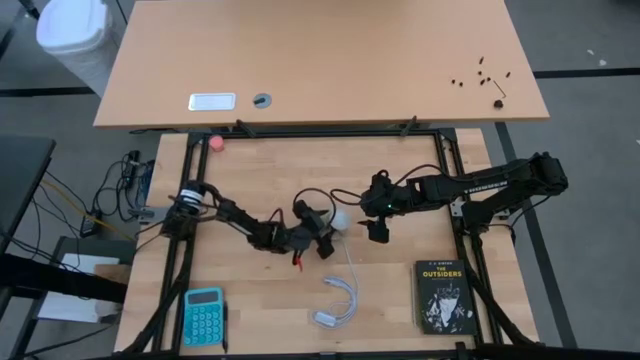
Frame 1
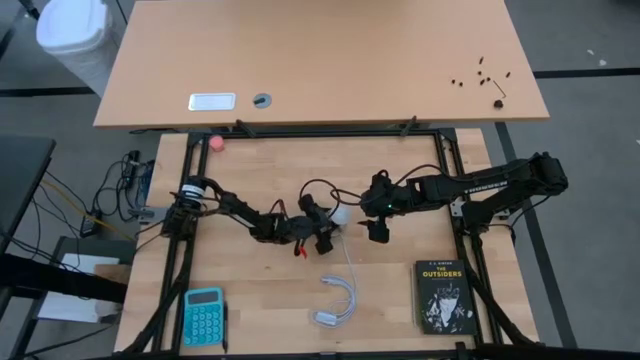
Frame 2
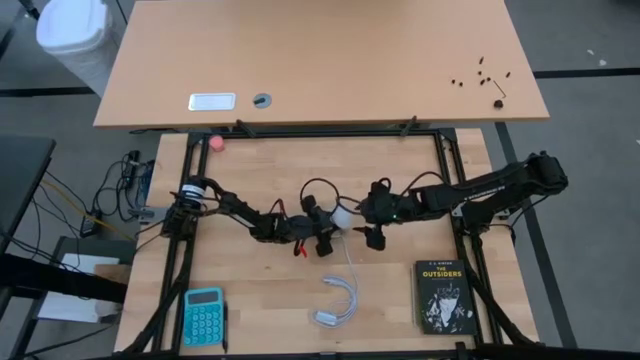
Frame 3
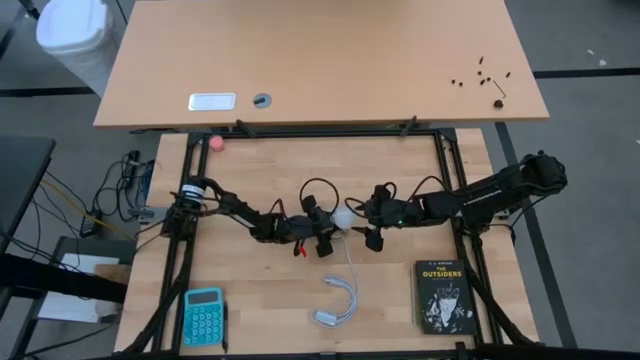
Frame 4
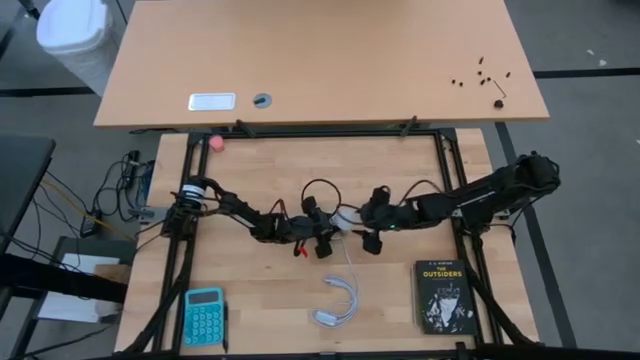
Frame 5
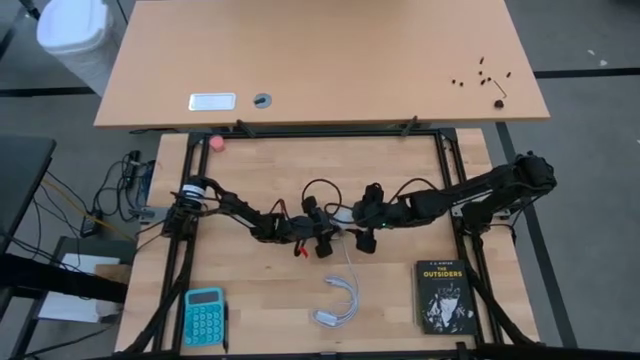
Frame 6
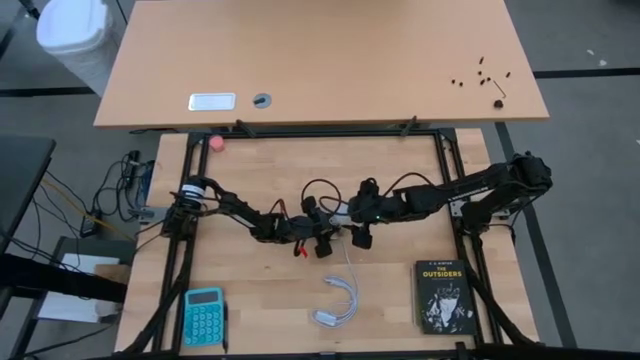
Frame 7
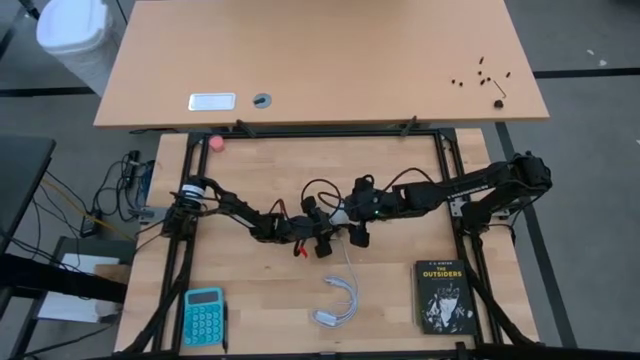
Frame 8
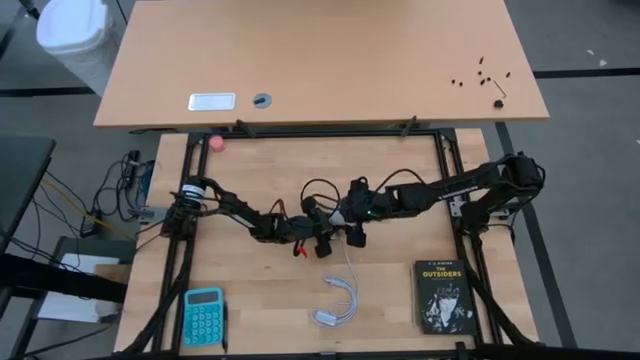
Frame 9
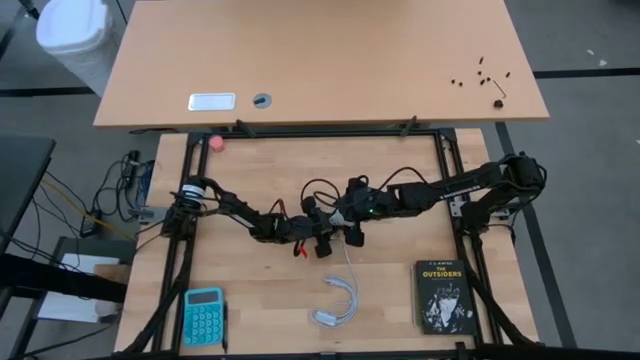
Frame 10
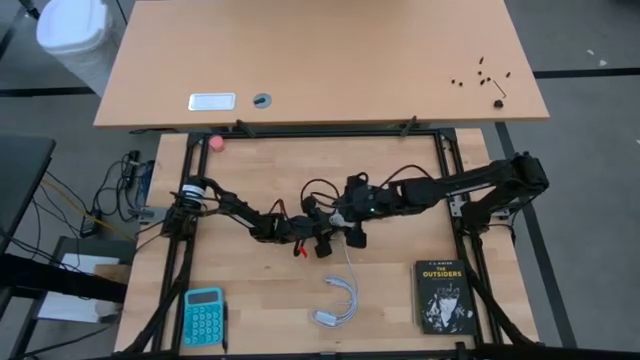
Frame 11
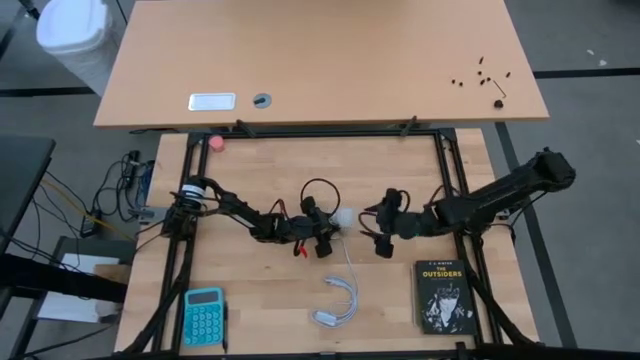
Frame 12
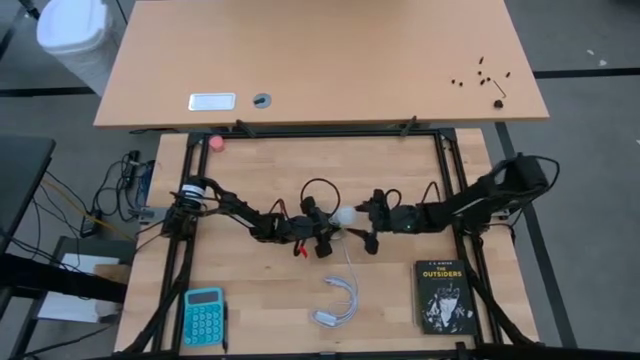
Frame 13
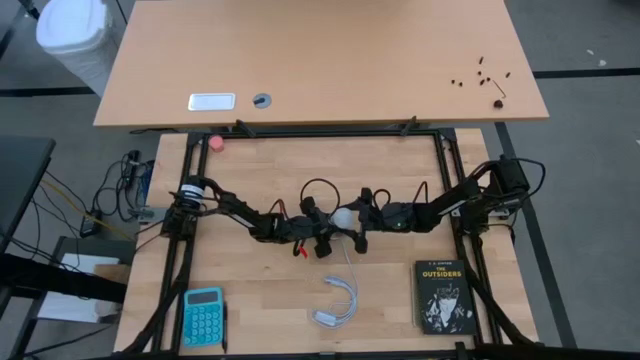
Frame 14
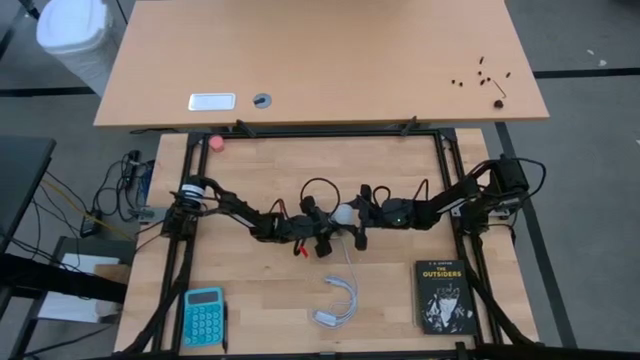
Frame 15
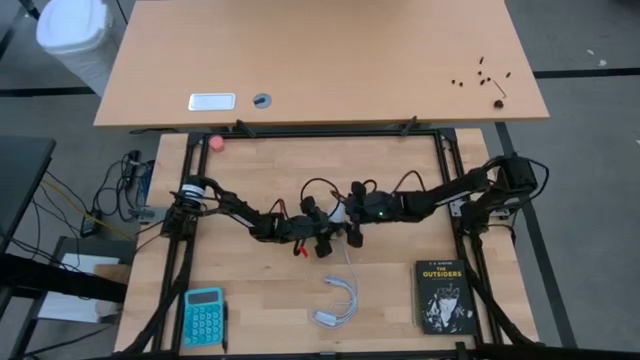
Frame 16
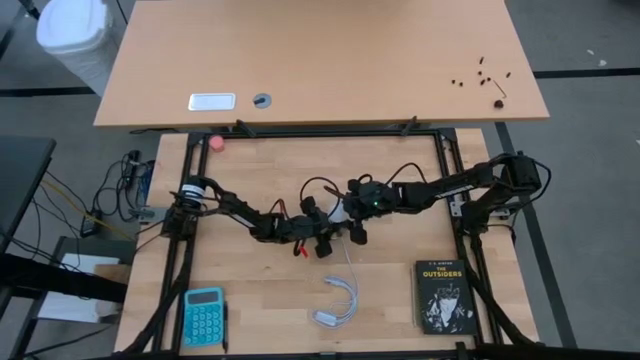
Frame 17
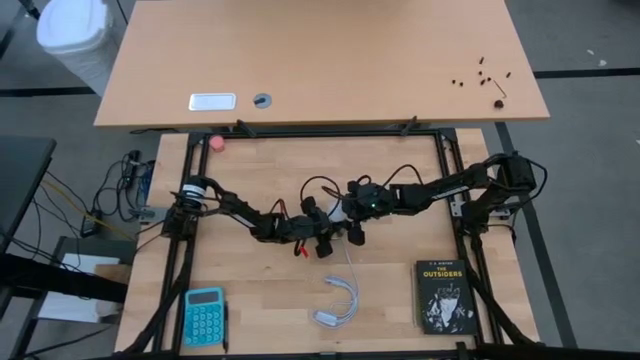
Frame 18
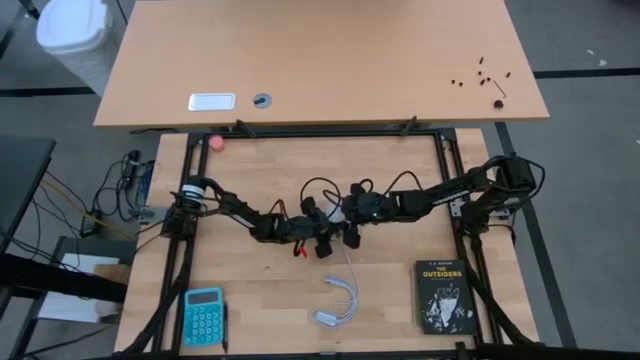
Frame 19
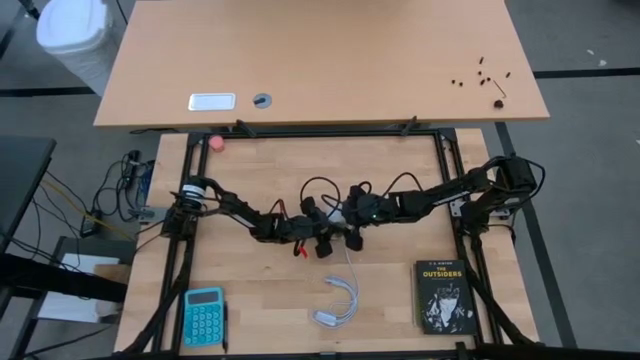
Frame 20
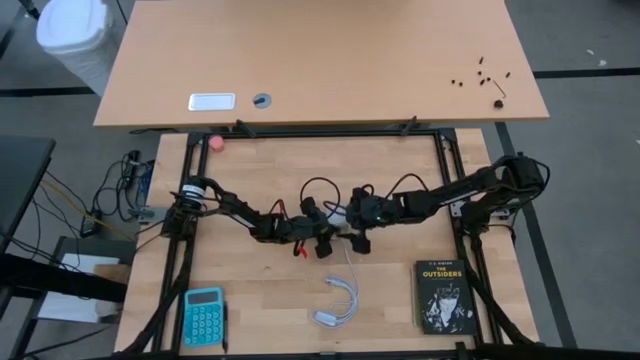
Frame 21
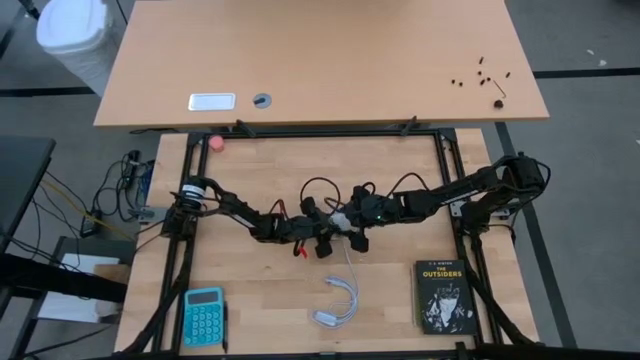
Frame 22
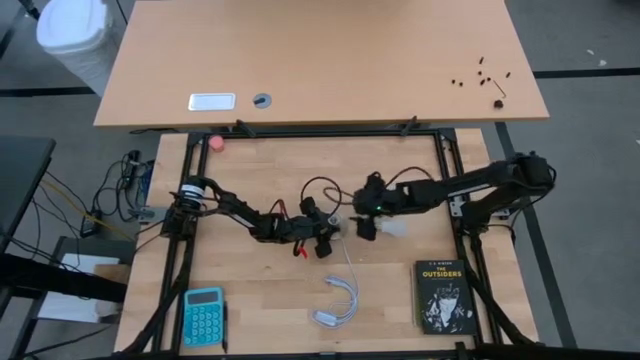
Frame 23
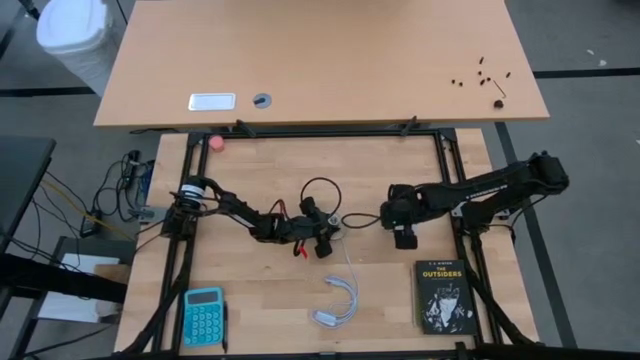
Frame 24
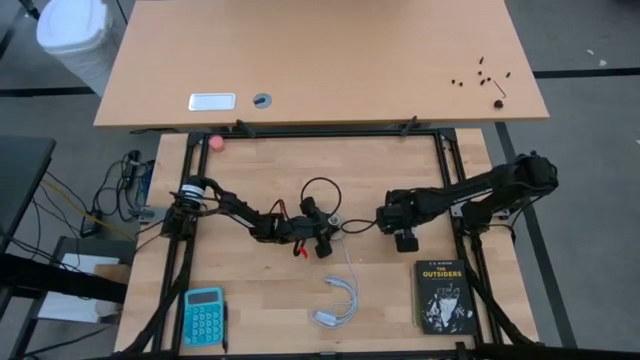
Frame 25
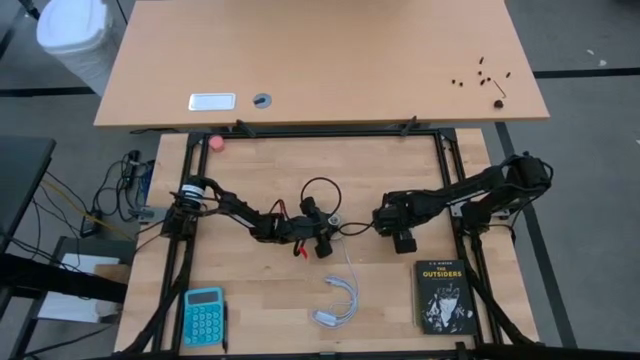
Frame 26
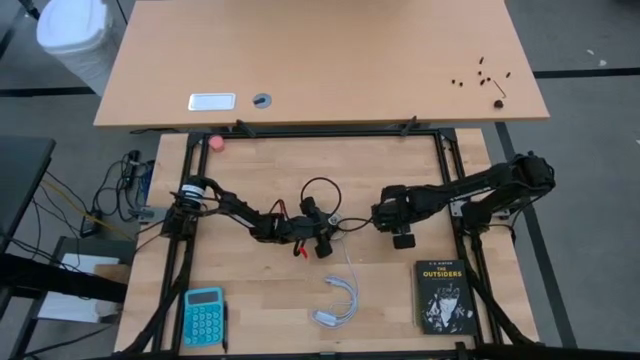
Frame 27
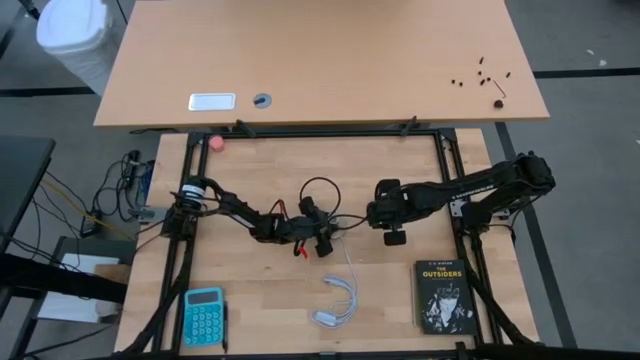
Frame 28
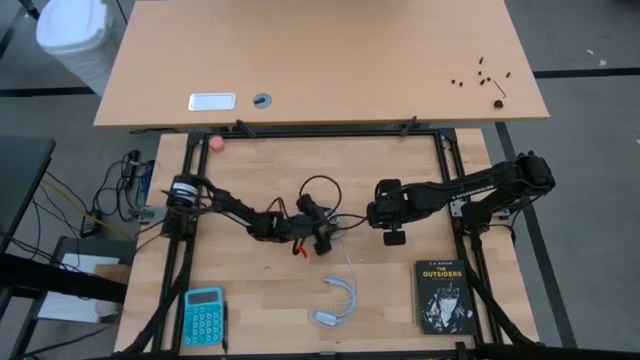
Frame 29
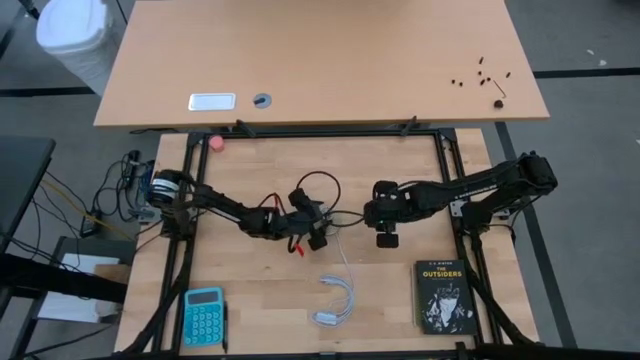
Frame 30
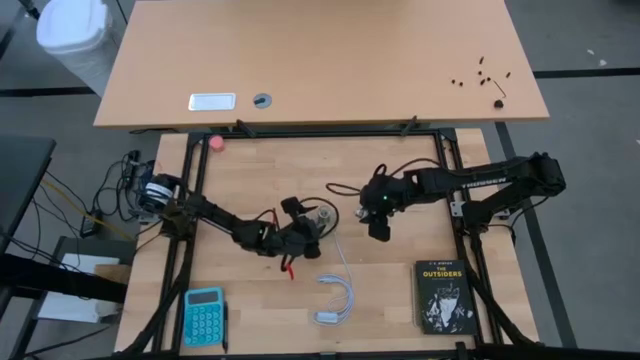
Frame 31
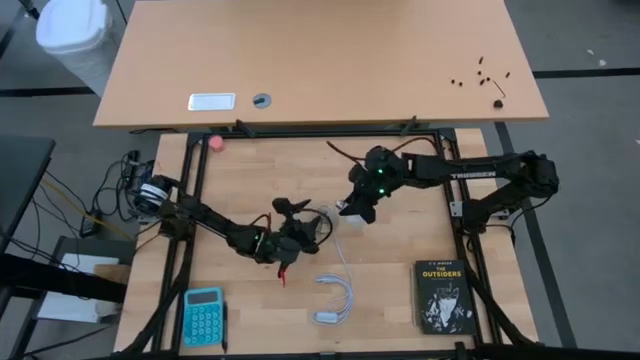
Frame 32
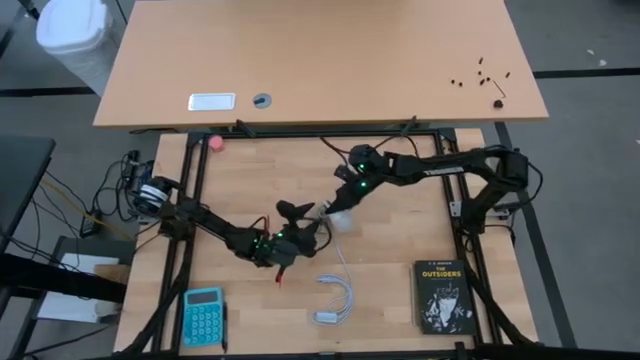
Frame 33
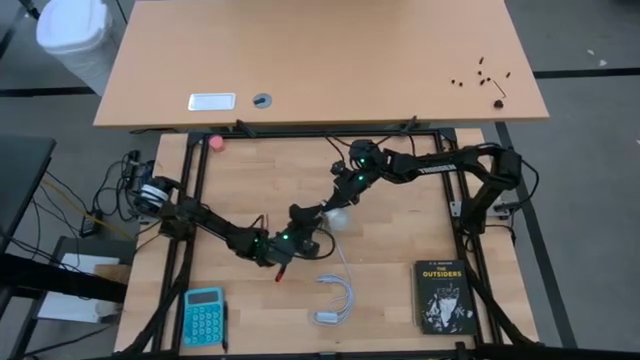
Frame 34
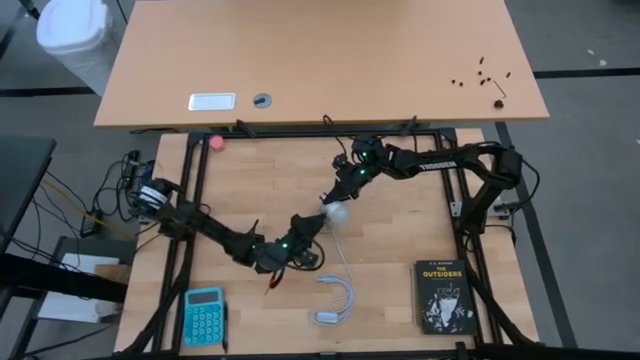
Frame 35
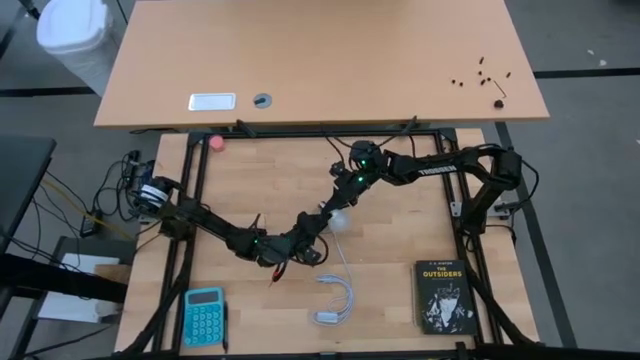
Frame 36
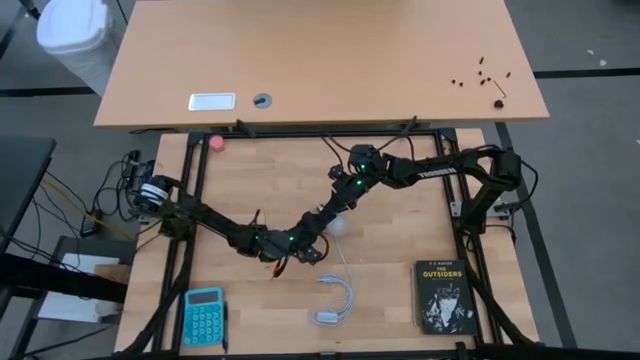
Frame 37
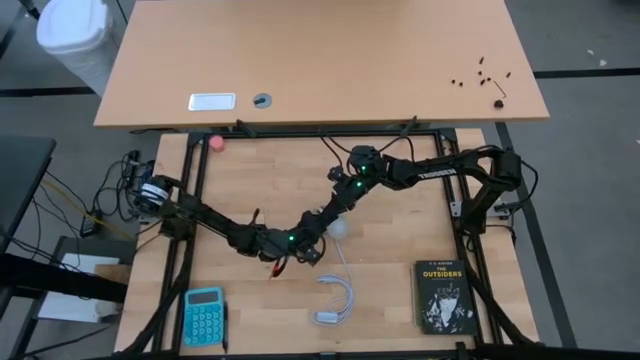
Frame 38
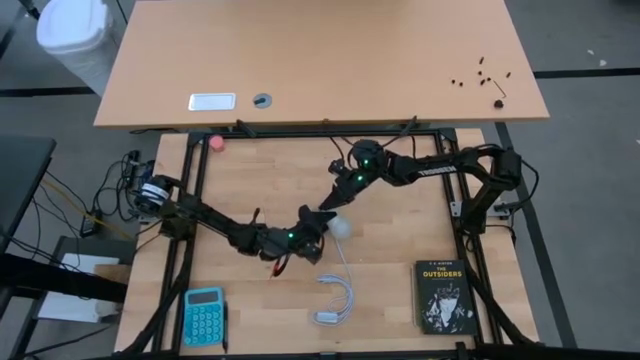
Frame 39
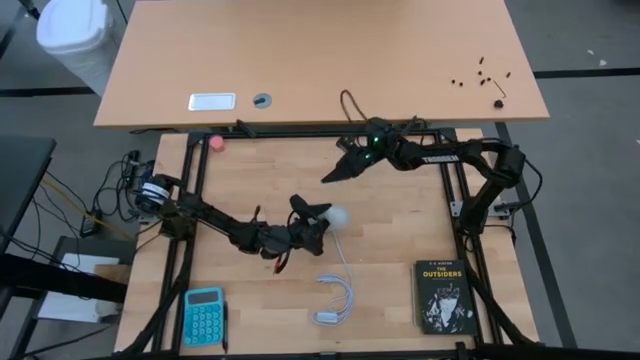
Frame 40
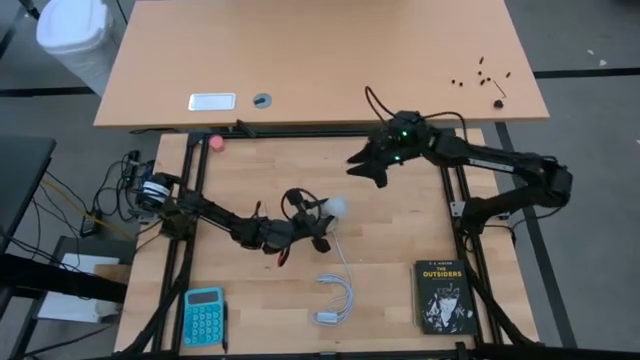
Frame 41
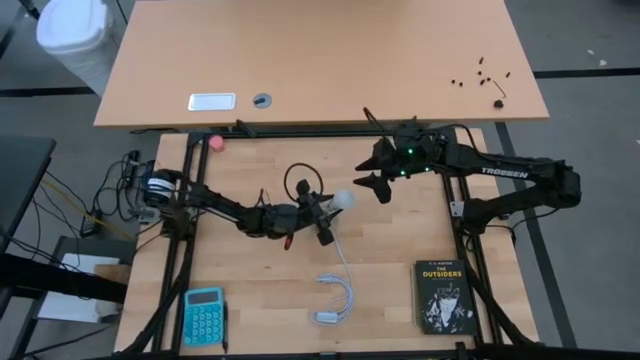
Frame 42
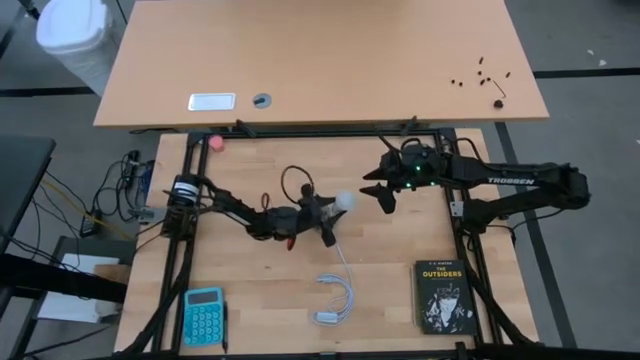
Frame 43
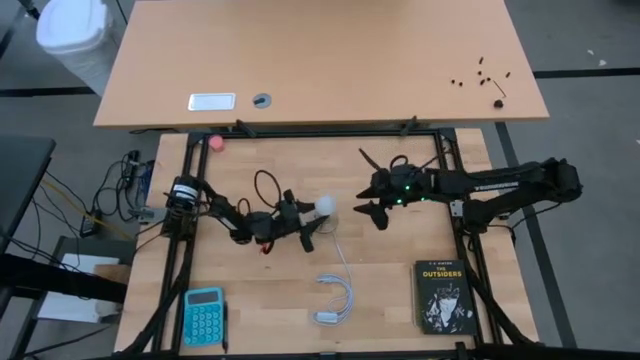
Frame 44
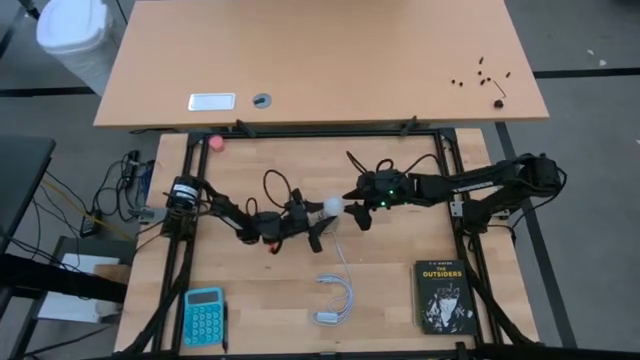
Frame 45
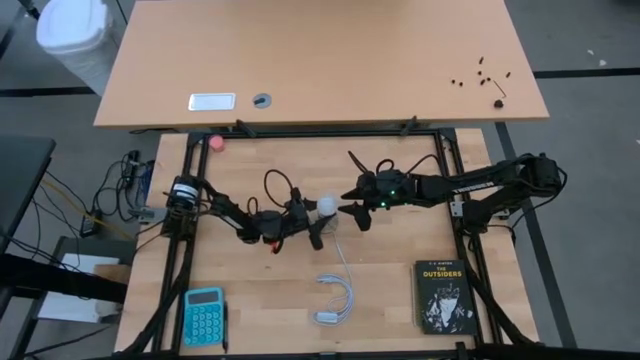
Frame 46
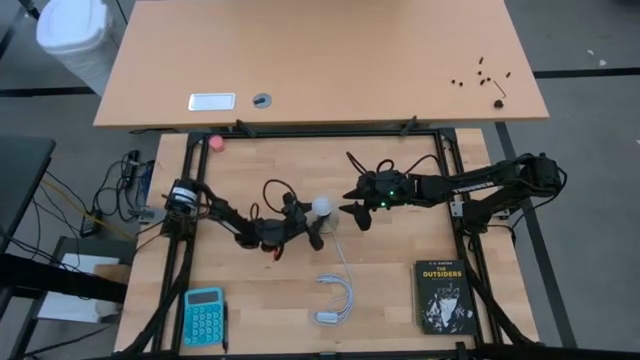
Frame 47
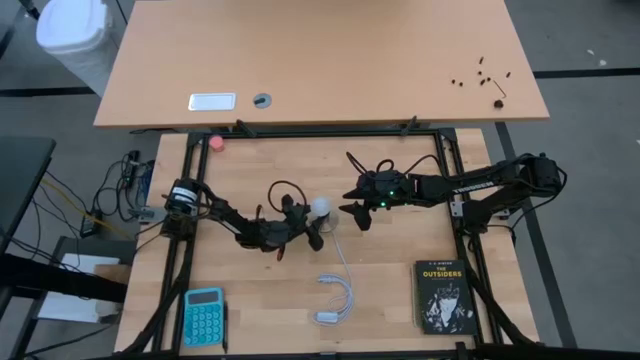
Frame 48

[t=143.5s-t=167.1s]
Task: Screw lightbulb
Insert the white lightbulb into the silver lamp
